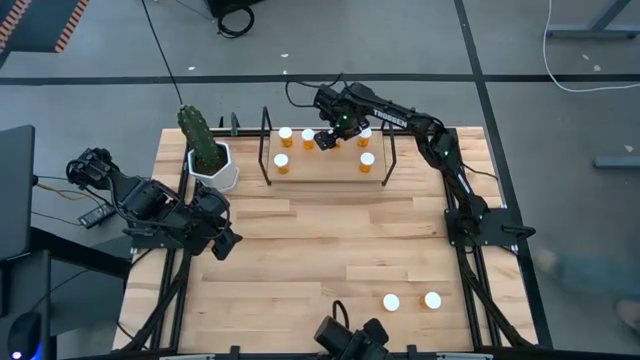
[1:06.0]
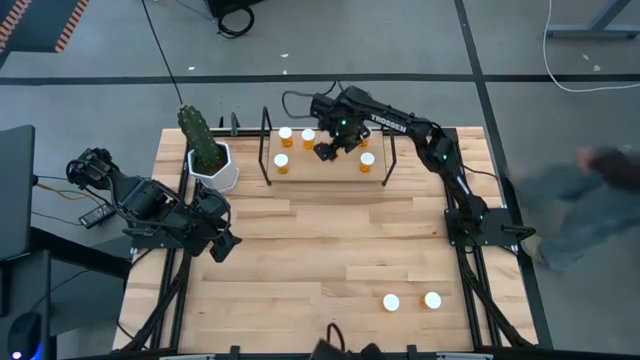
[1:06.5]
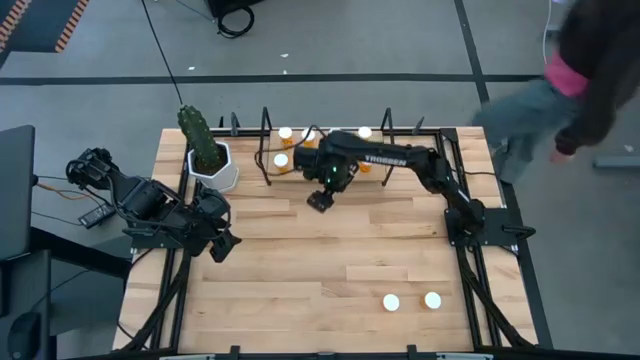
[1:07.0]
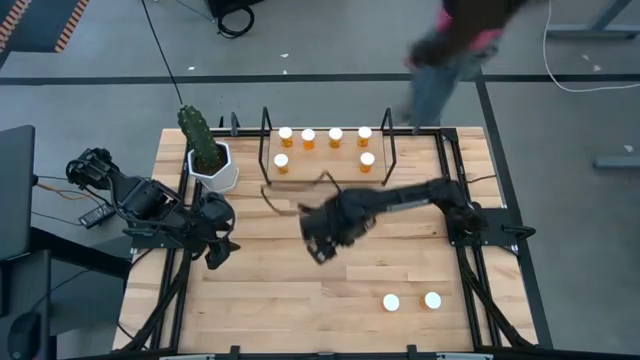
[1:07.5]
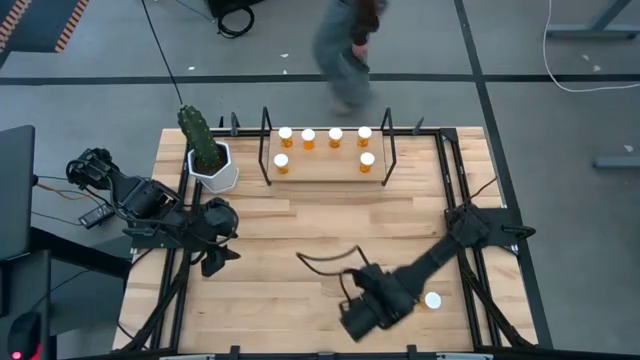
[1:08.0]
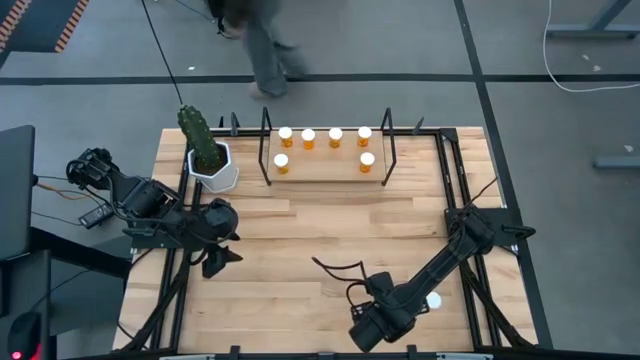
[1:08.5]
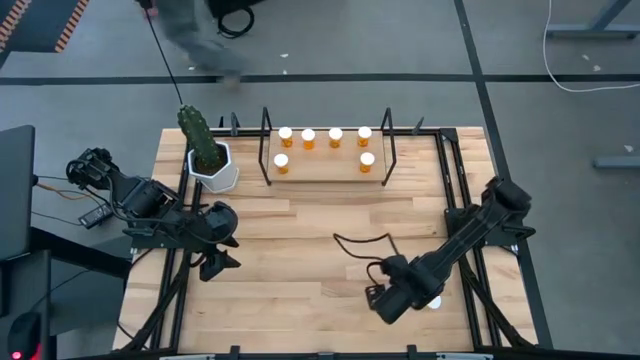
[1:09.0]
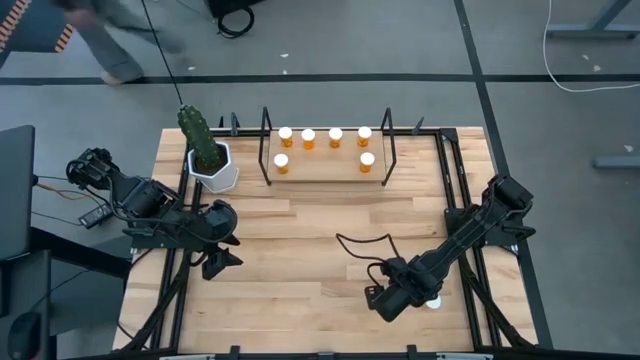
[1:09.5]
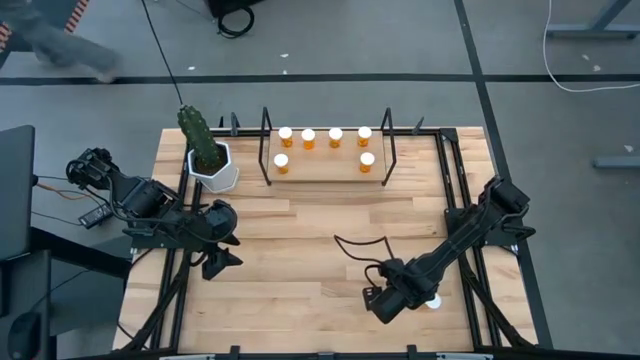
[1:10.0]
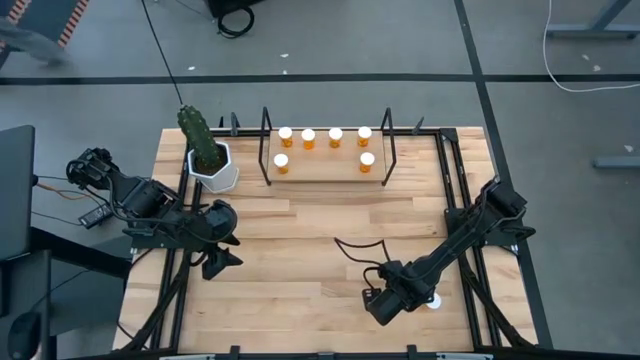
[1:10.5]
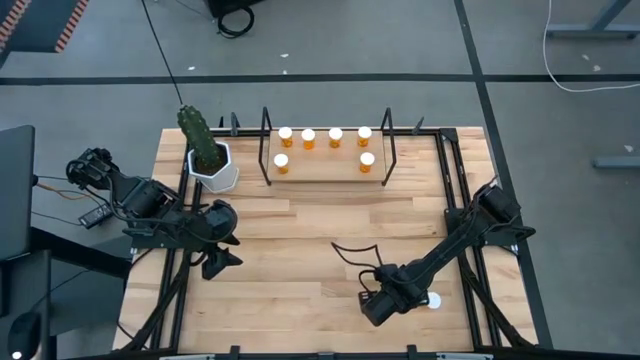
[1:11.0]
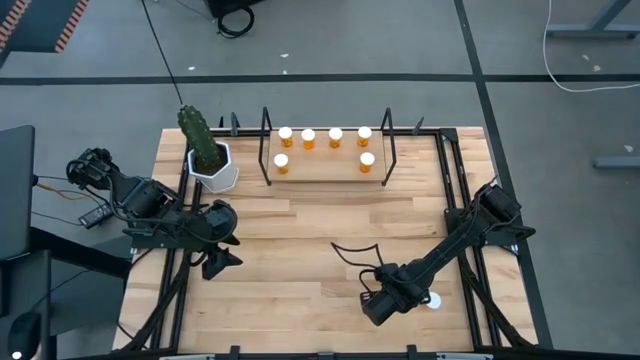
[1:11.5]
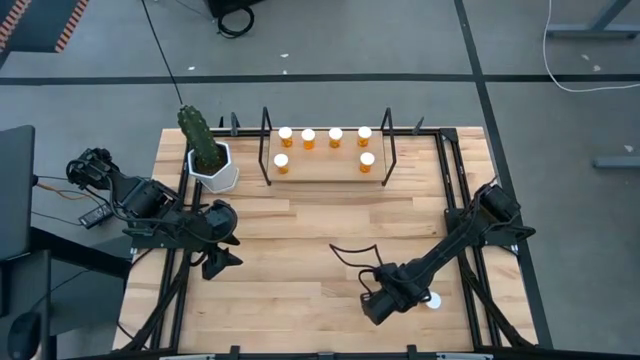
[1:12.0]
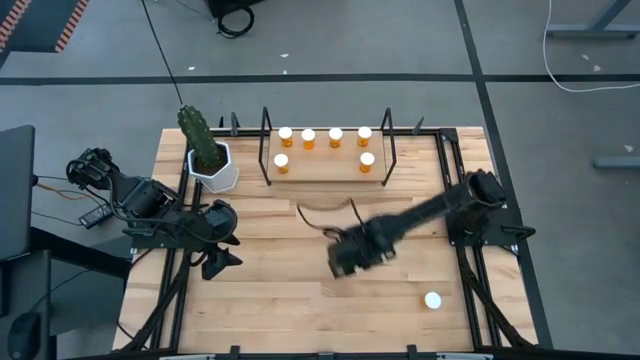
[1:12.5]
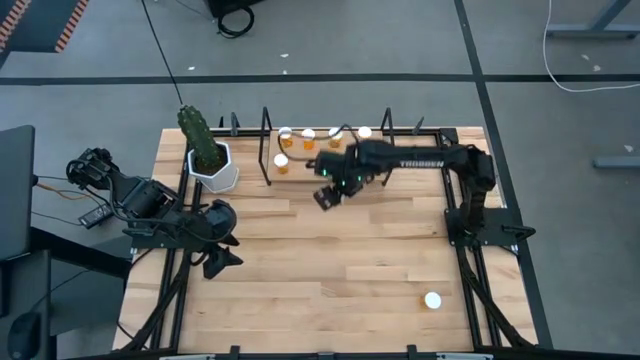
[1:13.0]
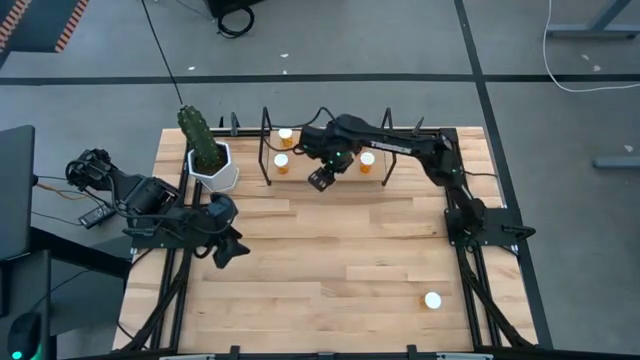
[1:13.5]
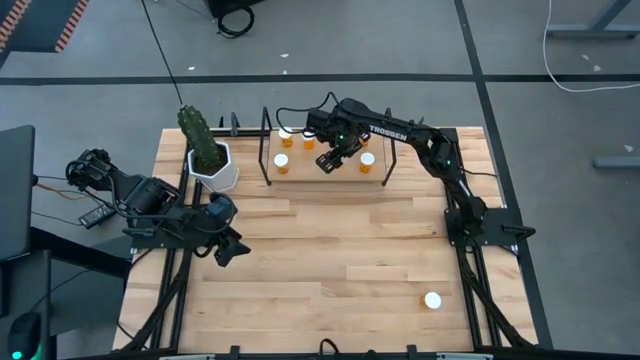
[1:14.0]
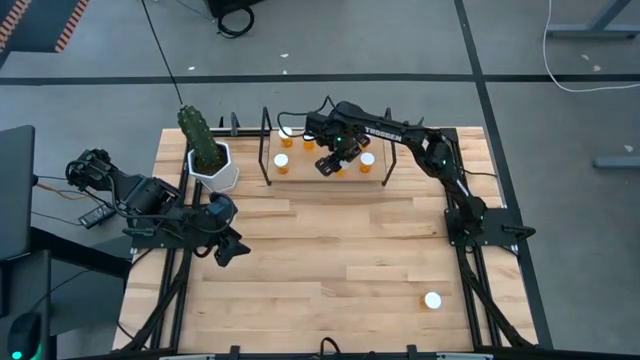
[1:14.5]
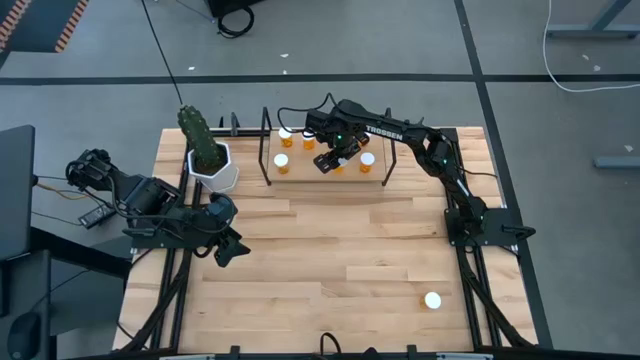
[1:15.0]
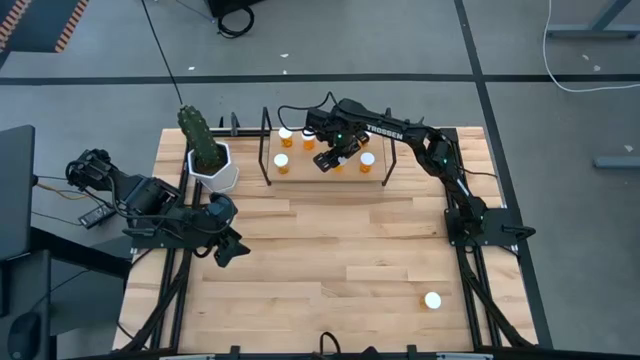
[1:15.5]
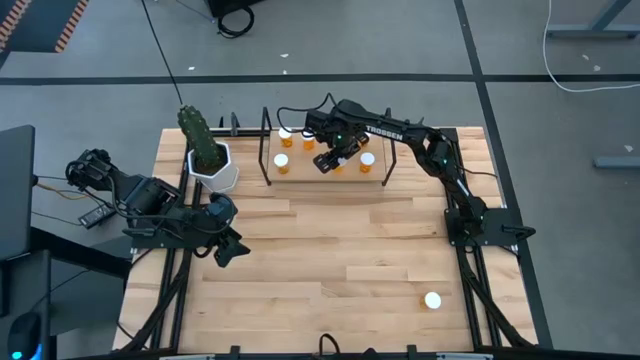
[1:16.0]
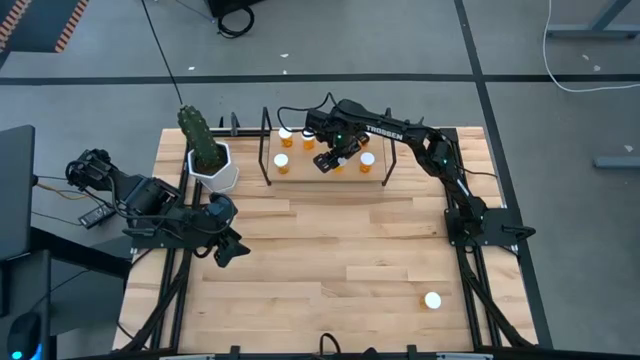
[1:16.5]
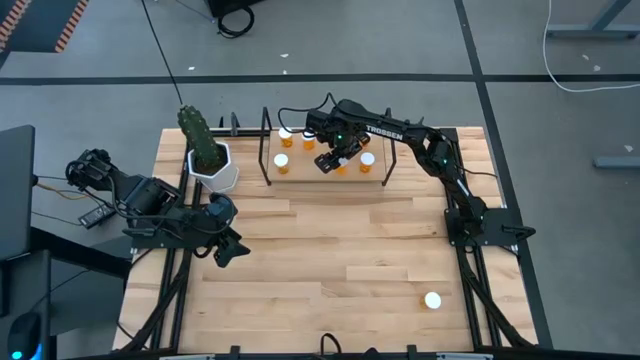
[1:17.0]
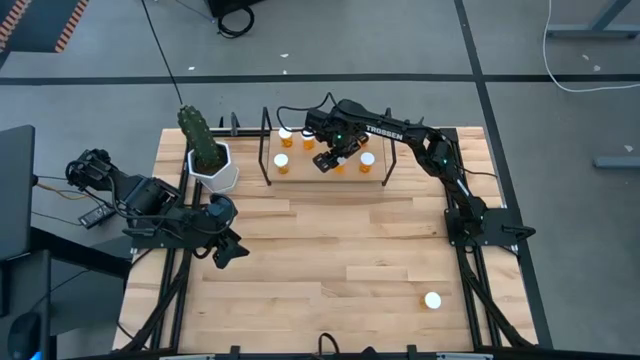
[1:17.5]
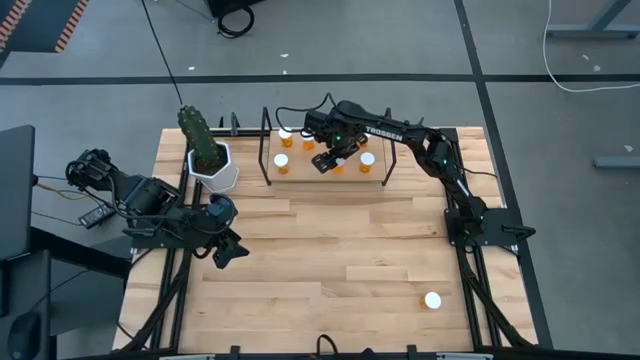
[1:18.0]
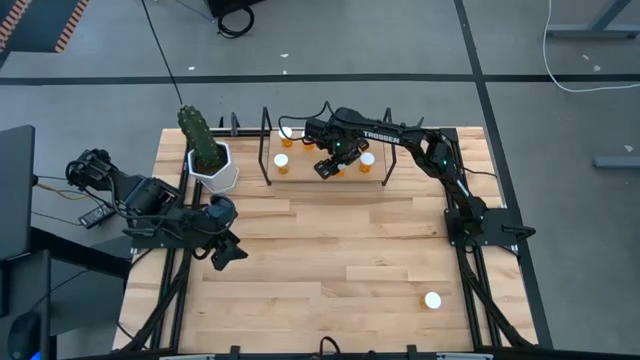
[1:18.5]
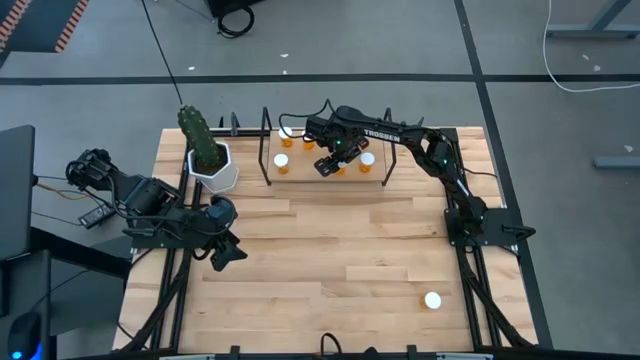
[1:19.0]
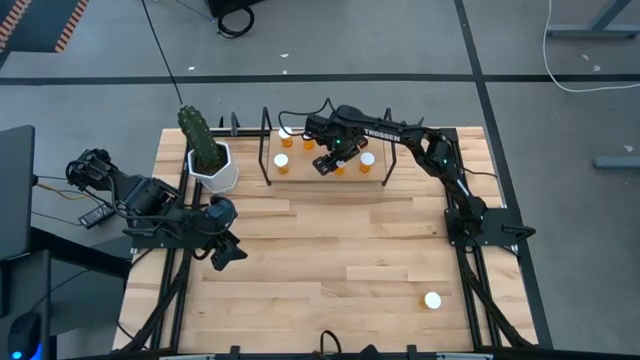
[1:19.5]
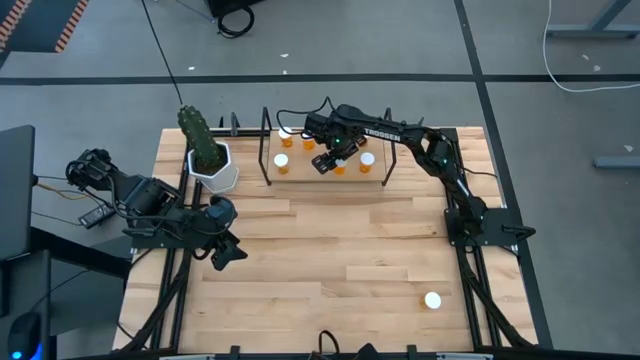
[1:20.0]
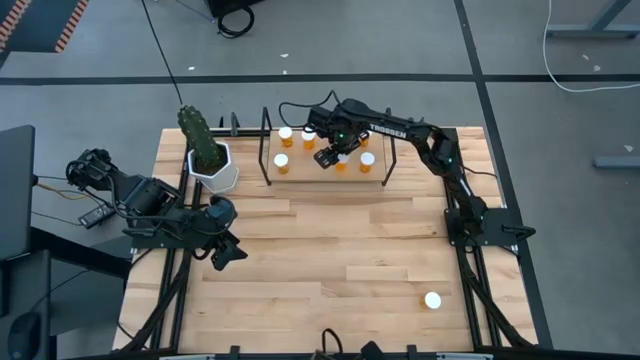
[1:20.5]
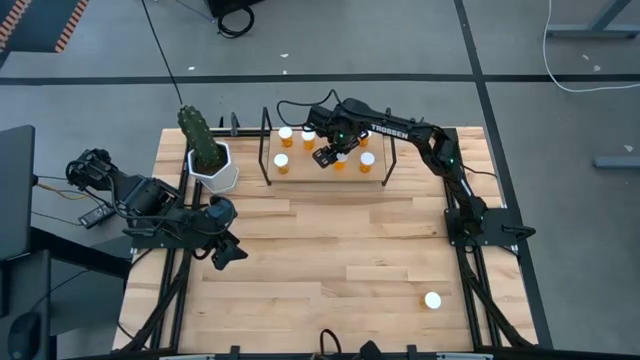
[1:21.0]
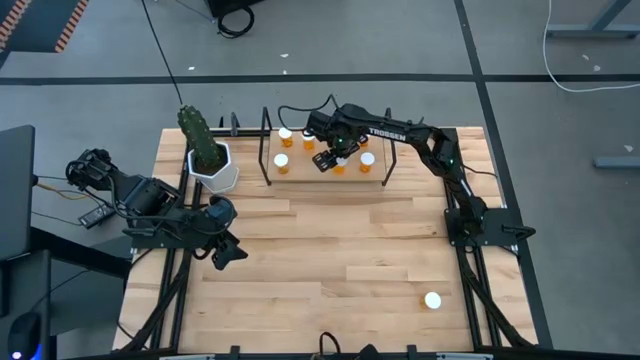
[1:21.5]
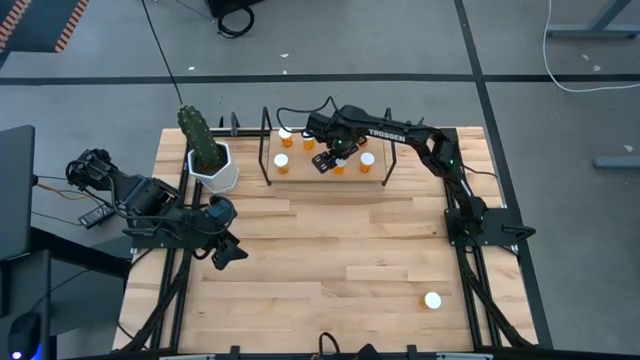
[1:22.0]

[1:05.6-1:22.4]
Task: Pick and place medicine bottles onto shelf by color
Put the orange pill bottle on the shelf

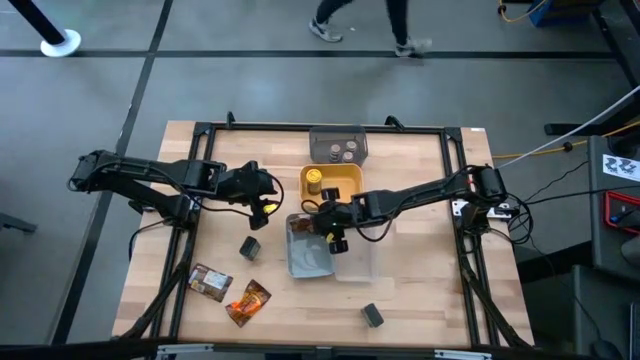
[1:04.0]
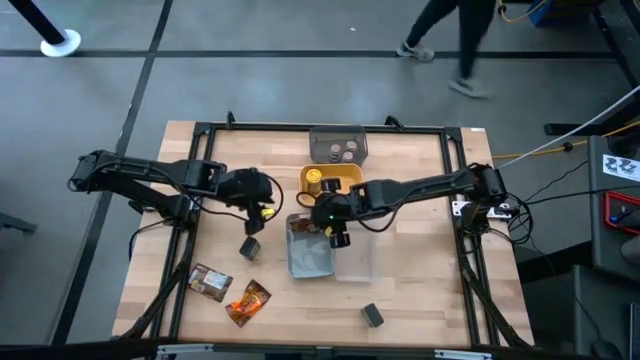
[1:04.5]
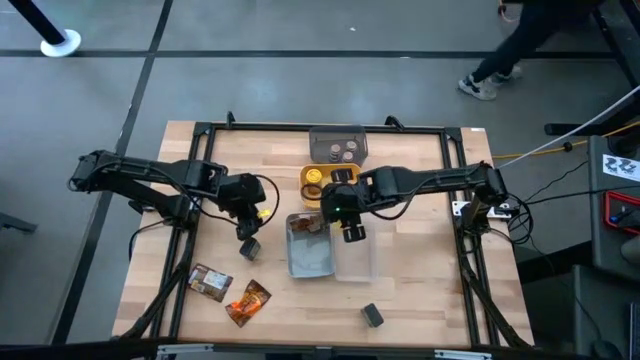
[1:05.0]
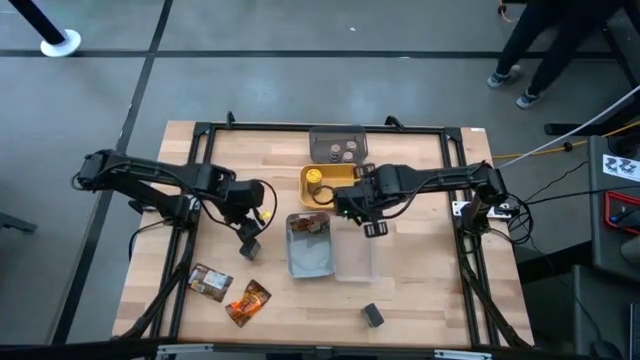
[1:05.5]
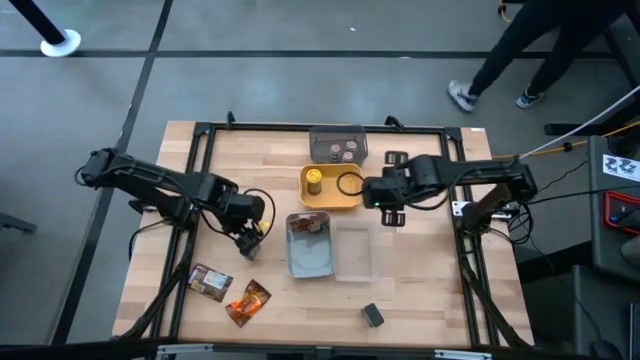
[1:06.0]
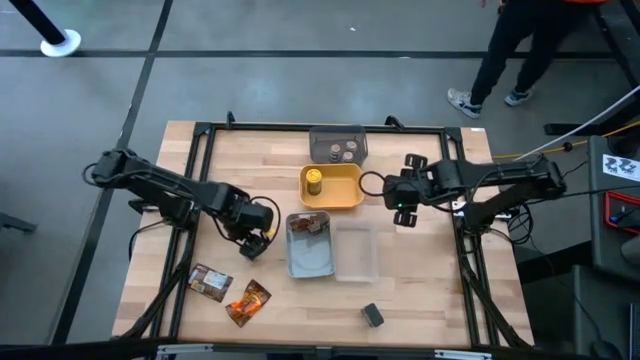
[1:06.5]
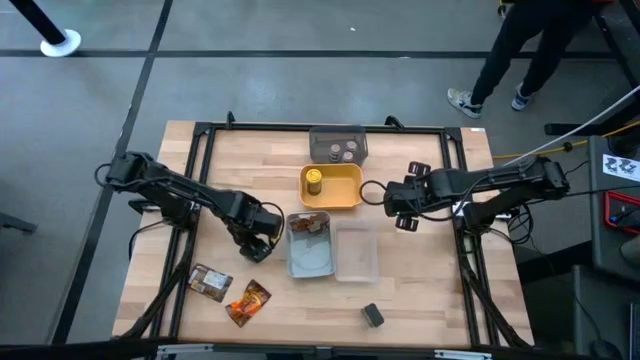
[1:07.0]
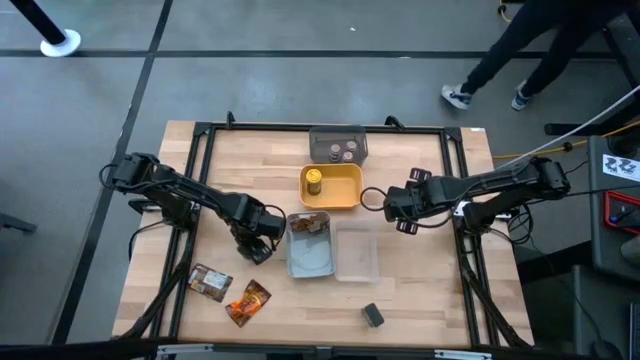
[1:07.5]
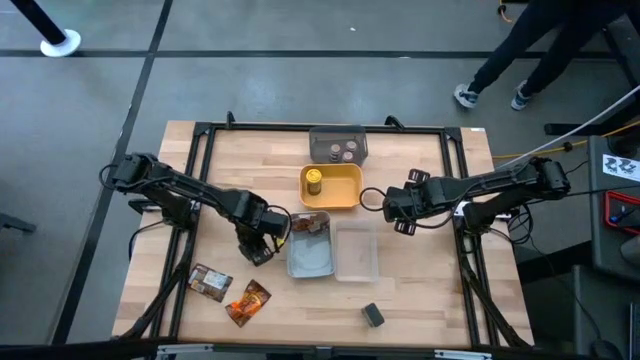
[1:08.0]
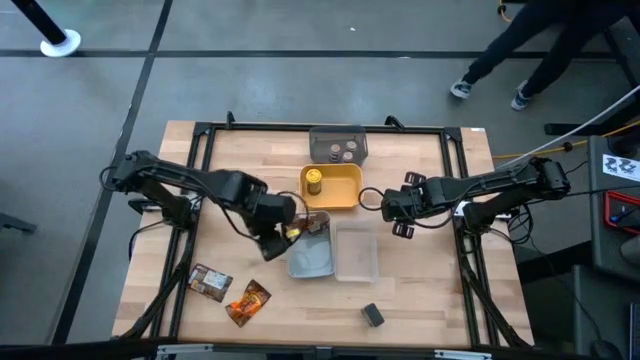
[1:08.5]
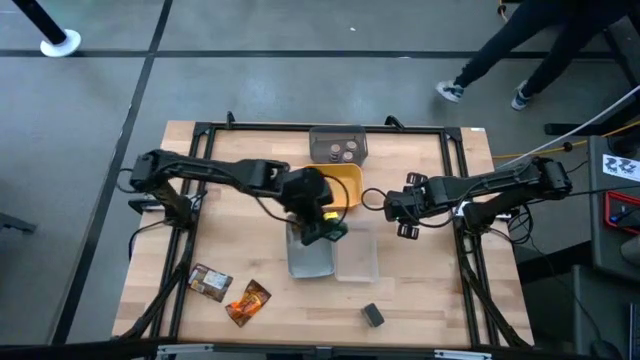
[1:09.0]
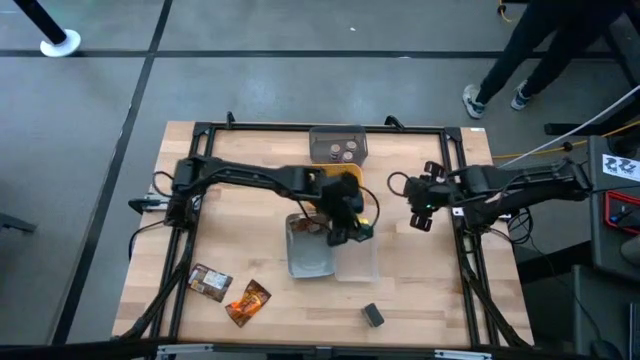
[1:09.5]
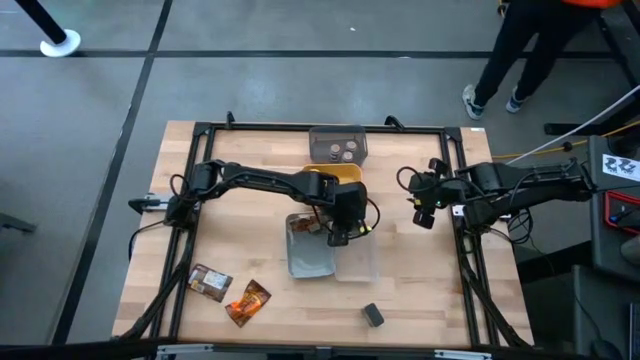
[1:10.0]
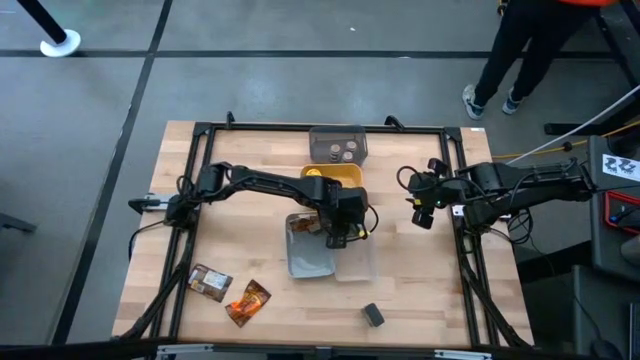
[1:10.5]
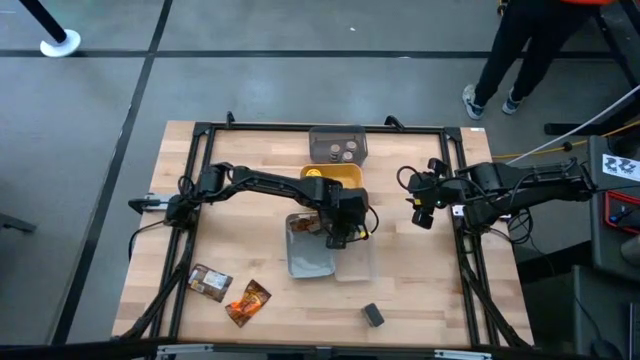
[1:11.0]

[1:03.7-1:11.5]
Task: Sort spices by type
Put the left black seasoning can into the transparent bin
